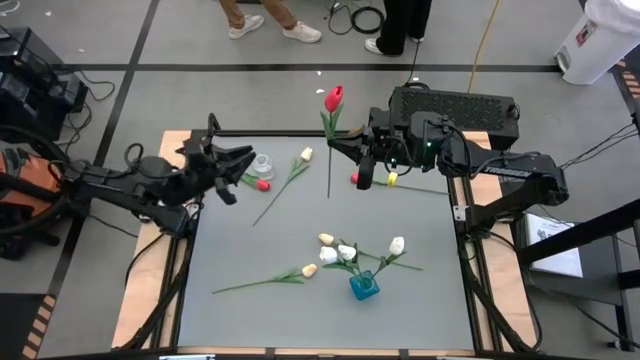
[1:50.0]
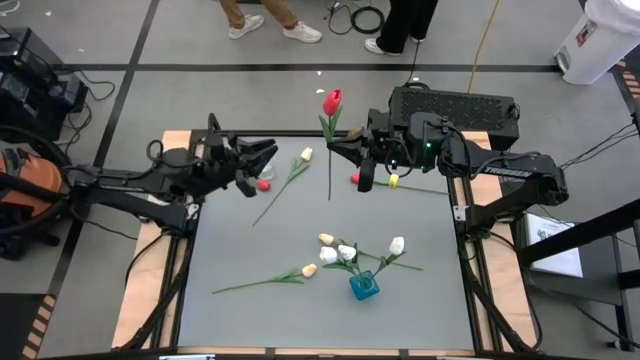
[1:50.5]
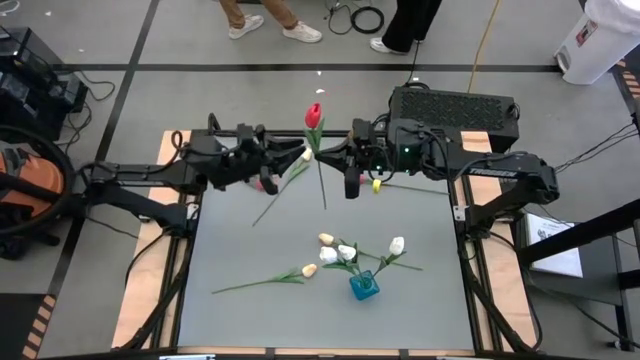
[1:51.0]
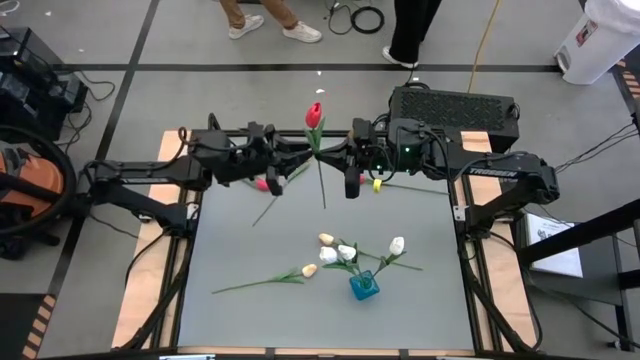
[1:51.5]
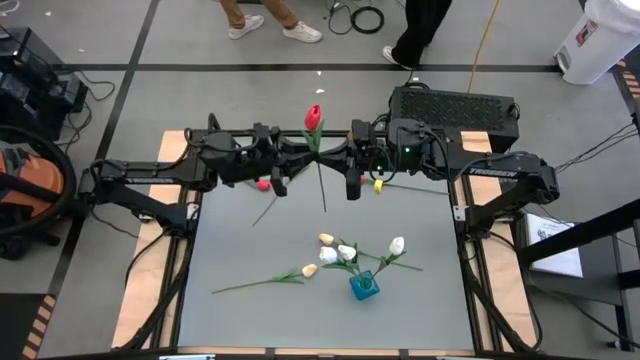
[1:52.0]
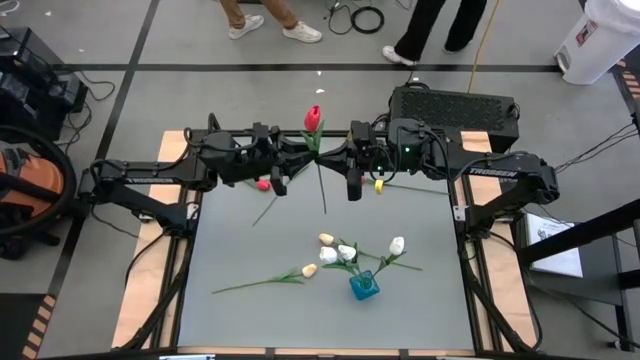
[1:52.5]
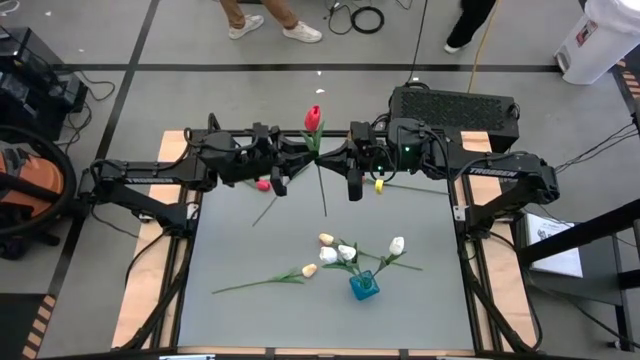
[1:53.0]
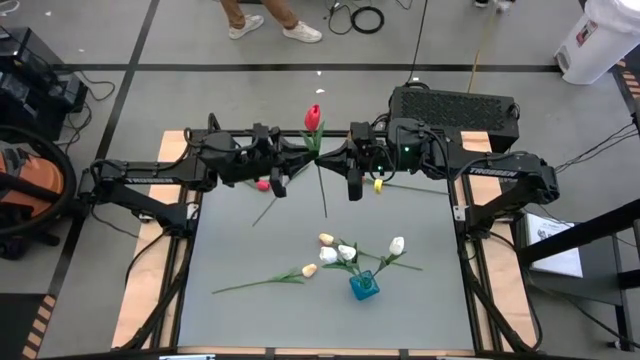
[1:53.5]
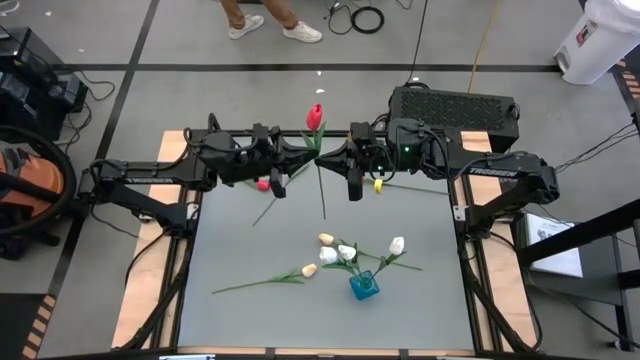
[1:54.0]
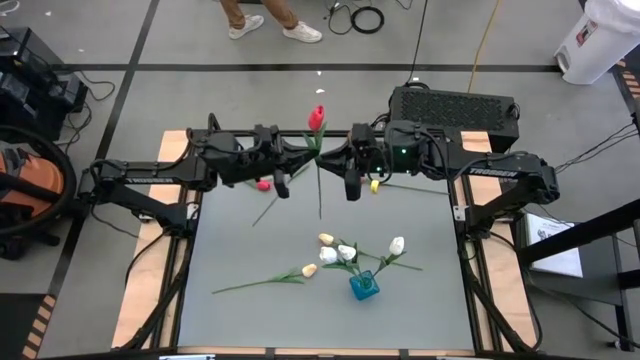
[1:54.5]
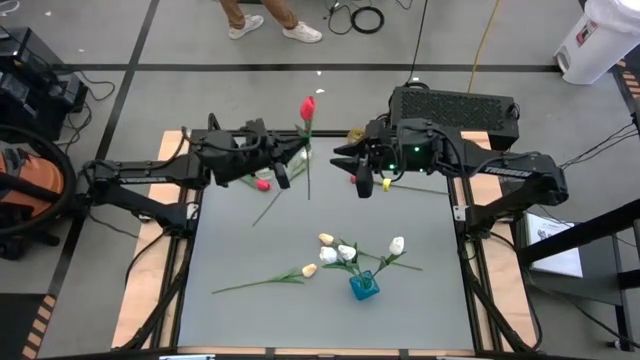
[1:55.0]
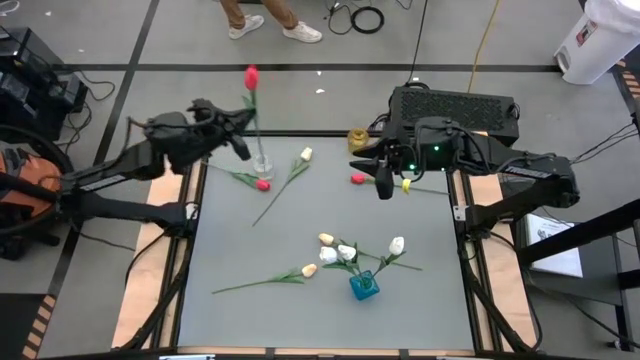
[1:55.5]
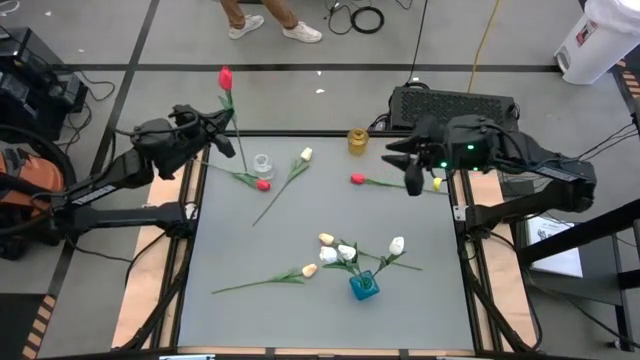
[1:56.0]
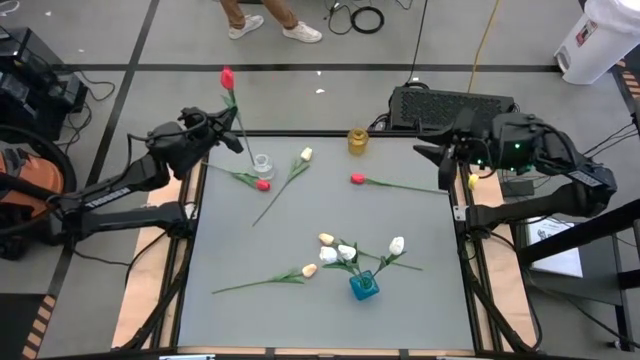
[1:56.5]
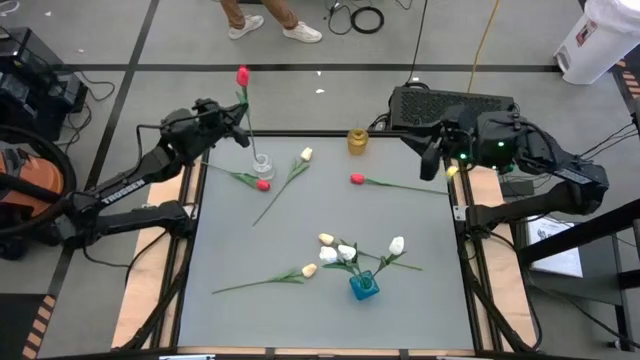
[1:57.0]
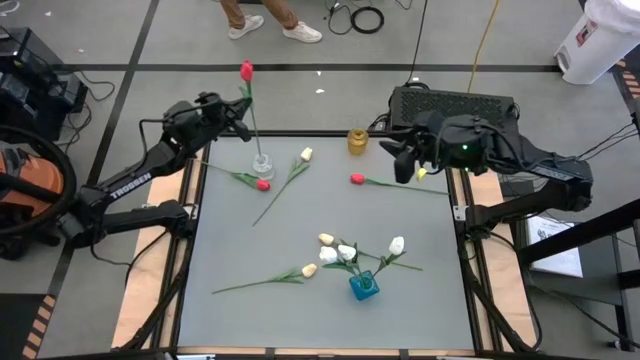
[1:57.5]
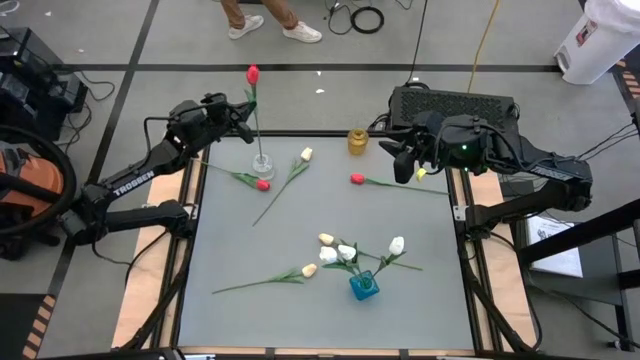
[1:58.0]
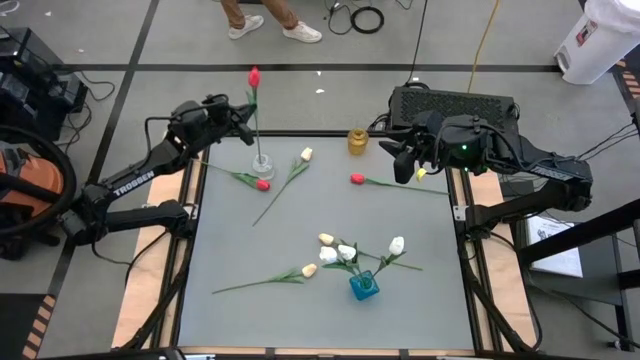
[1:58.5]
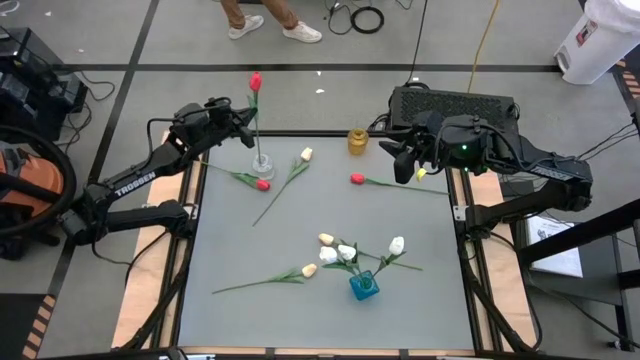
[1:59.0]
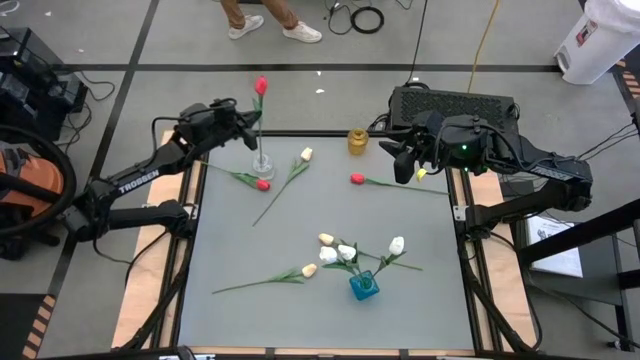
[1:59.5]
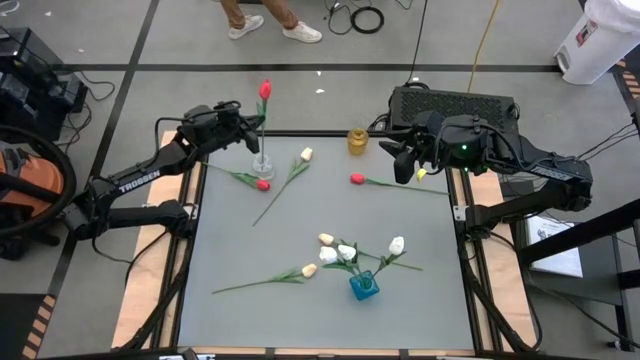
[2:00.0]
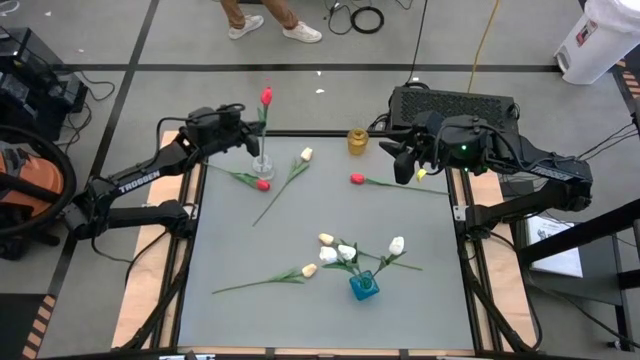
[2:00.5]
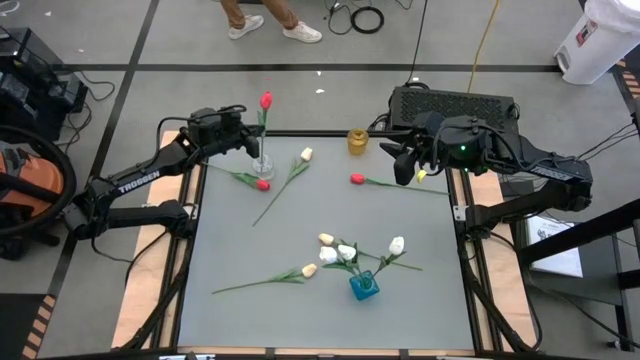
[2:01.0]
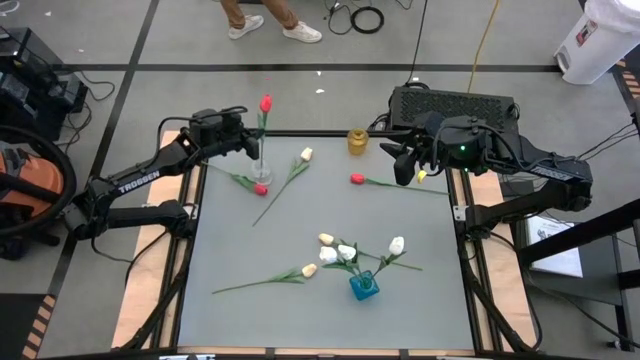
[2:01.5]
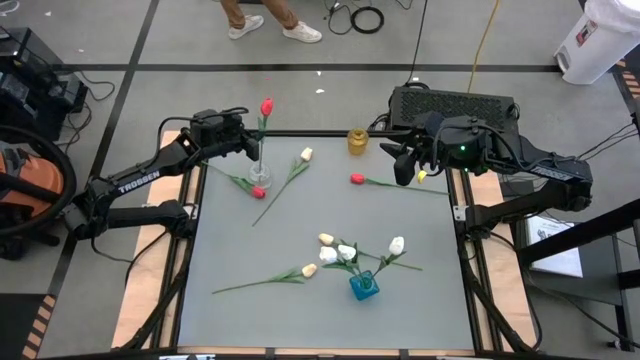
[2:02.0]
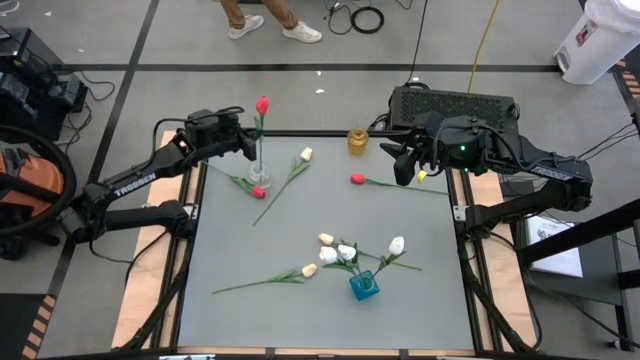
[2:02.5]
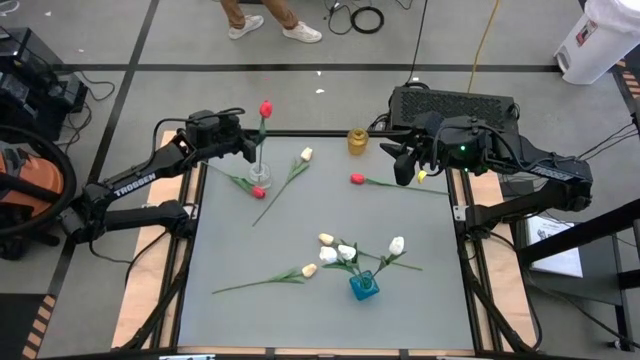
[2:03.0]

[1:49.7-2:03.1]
Task: Sort flowers into vase by color
Put the bottom right red tulip into the transparent vase

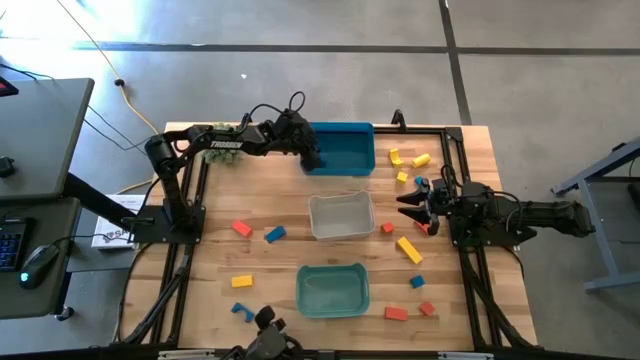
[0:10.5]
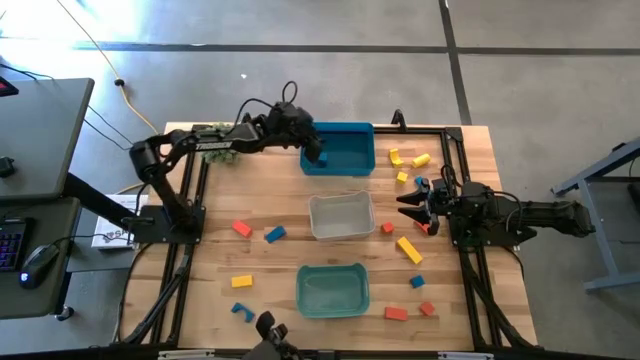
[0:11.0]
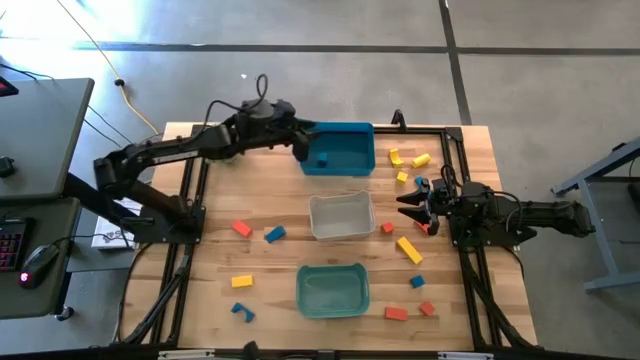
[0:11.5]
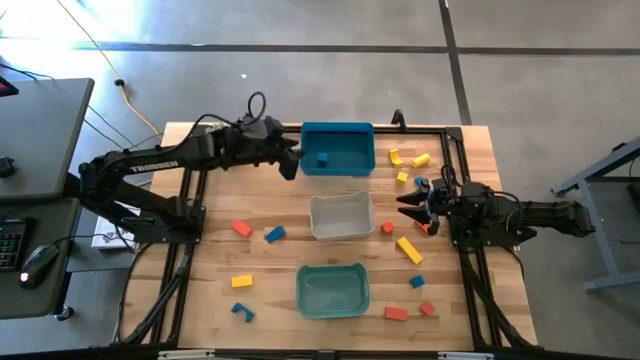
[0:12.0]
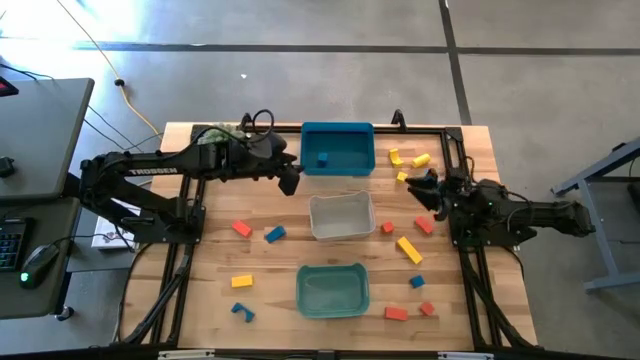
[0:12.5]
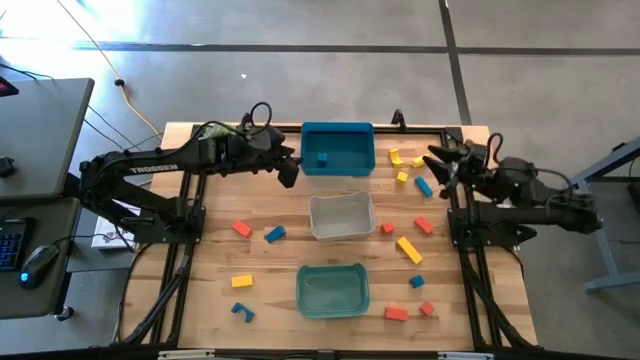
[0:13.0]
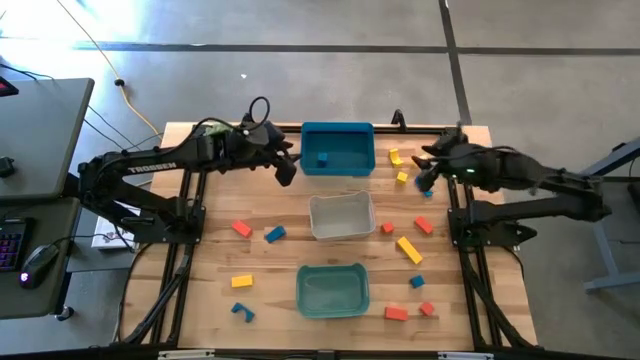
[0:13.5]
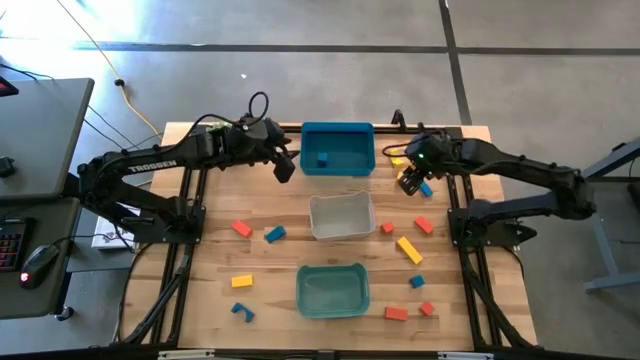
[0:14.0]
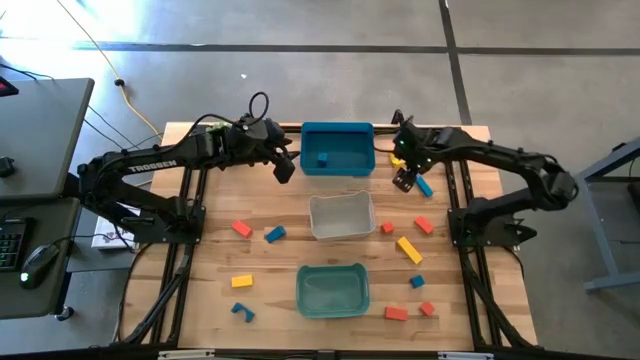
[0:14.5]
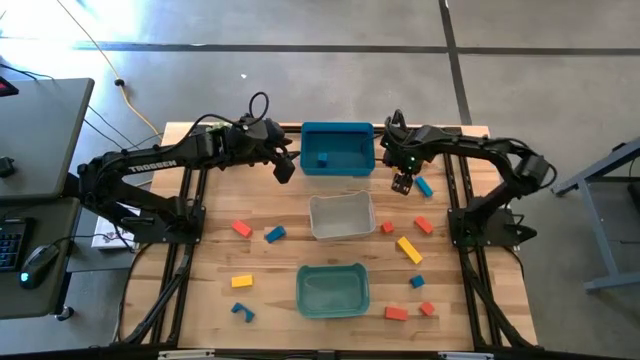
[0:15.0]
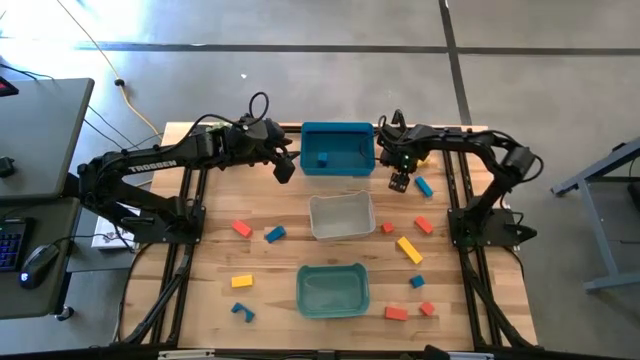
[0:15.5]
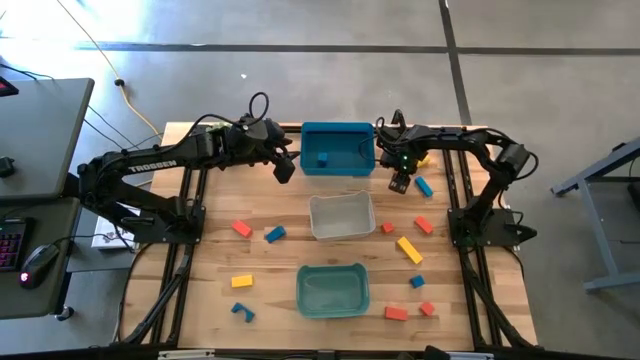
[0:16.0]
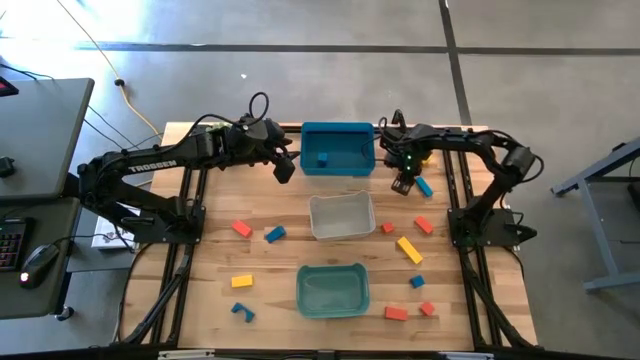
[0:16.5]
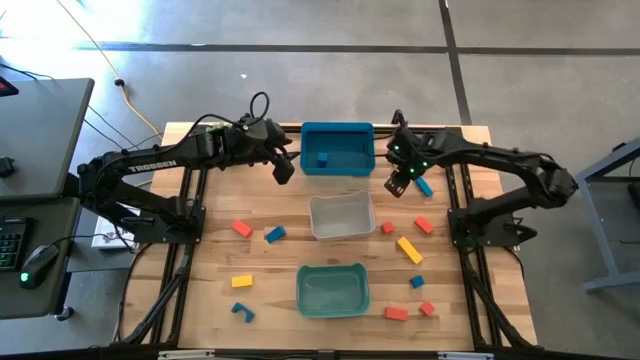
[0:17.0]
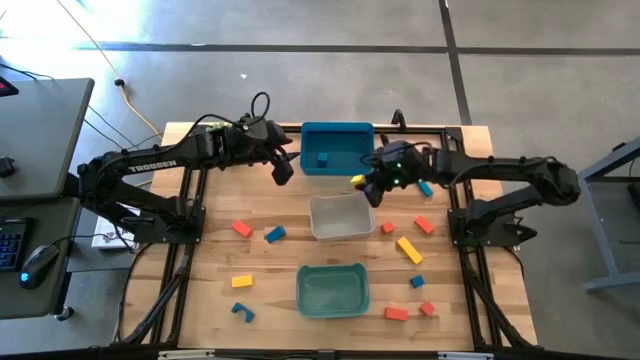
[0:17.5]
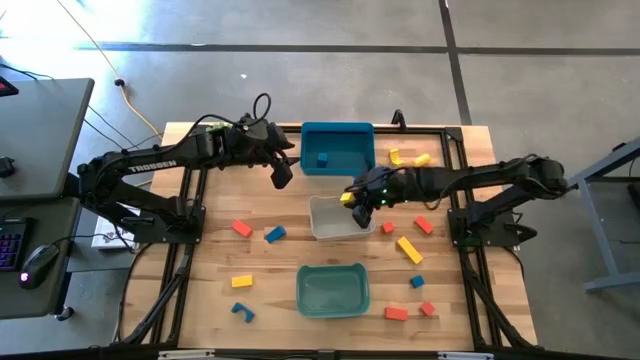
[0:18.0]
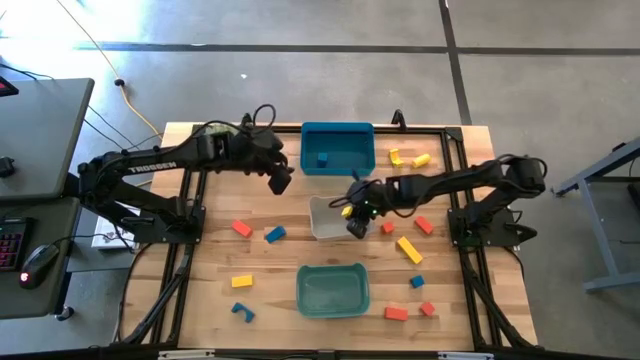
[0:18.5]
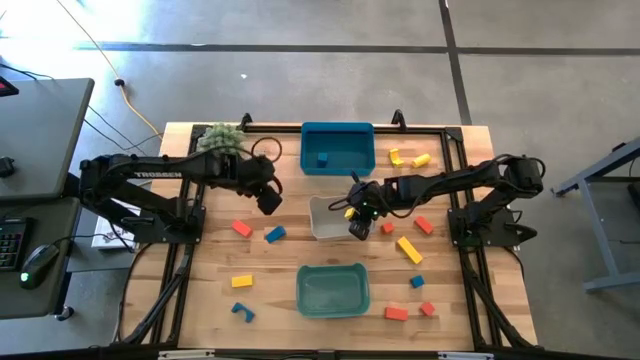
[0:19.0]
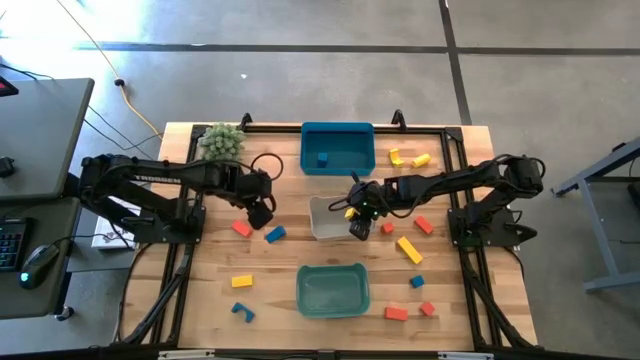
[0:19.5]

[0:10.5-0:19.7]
Task: Sort & place blocks by color
Put the yellow block into the white bin
